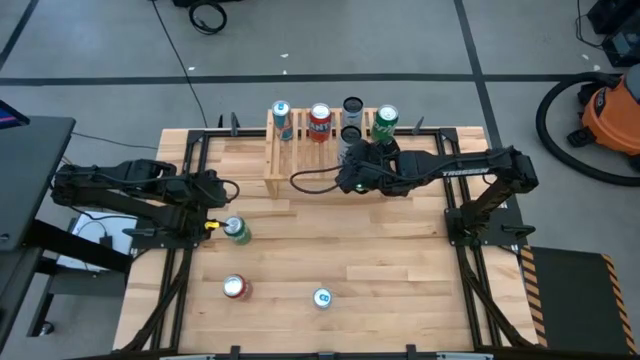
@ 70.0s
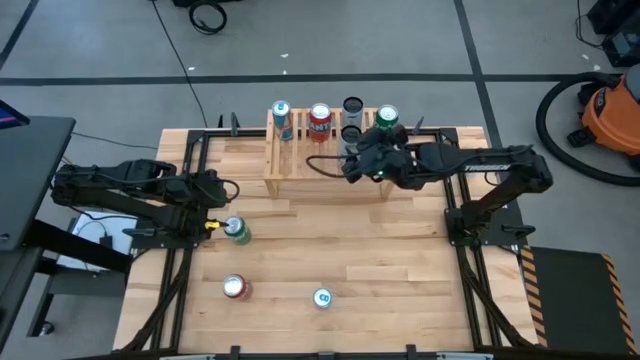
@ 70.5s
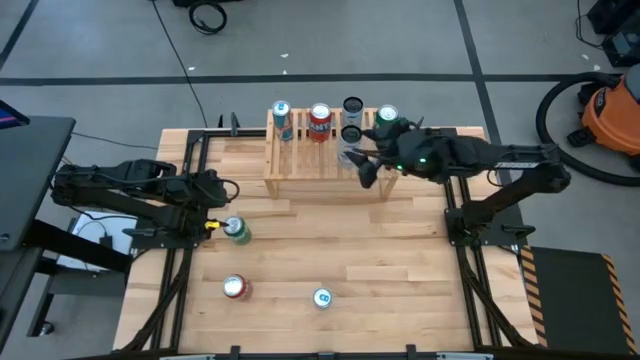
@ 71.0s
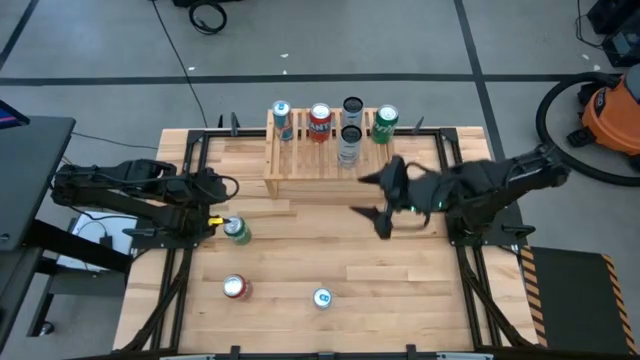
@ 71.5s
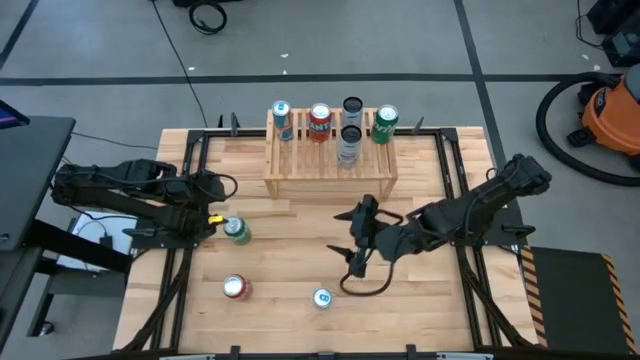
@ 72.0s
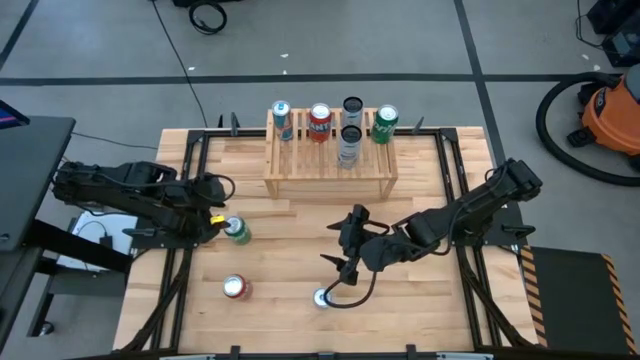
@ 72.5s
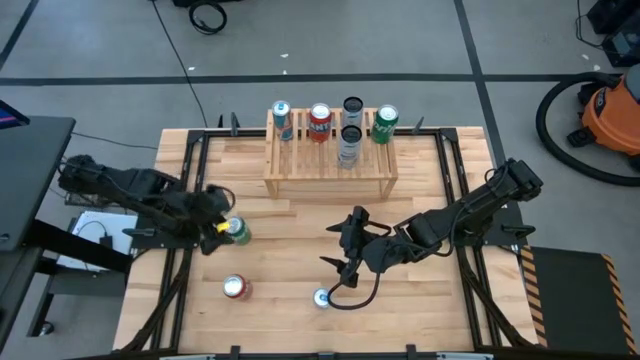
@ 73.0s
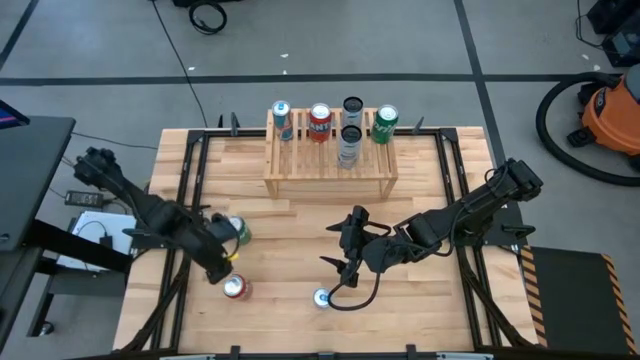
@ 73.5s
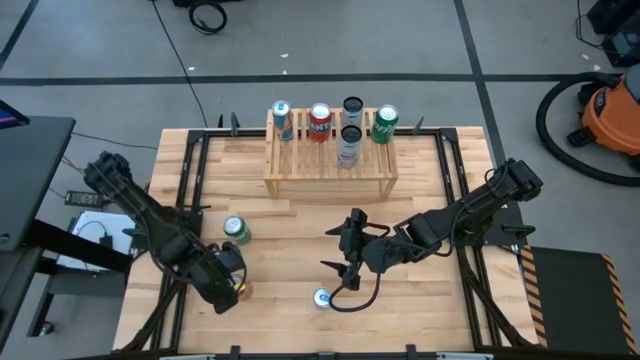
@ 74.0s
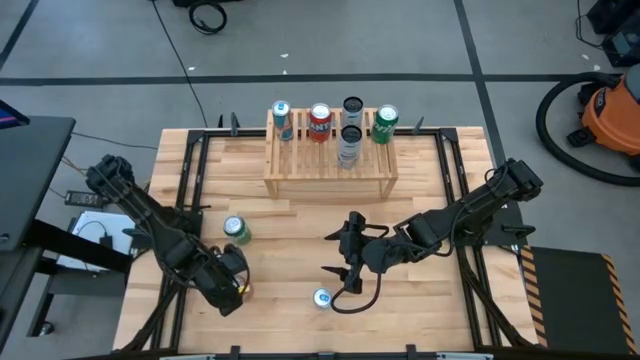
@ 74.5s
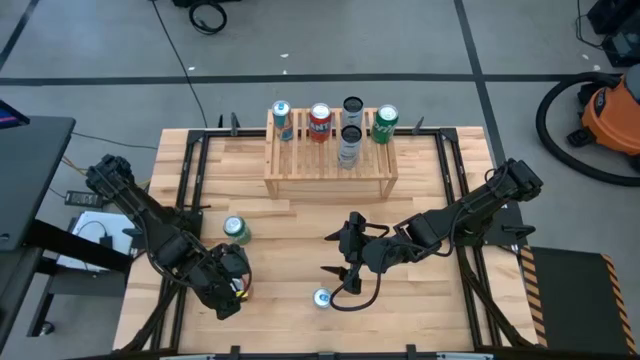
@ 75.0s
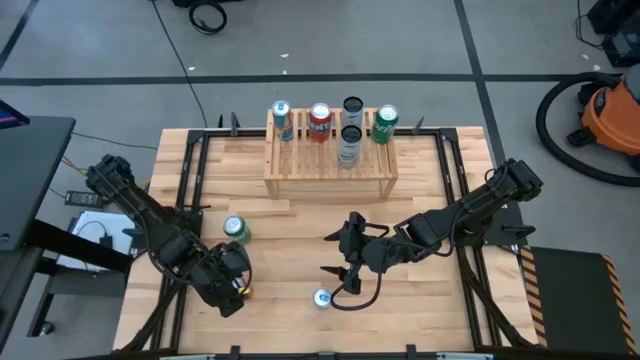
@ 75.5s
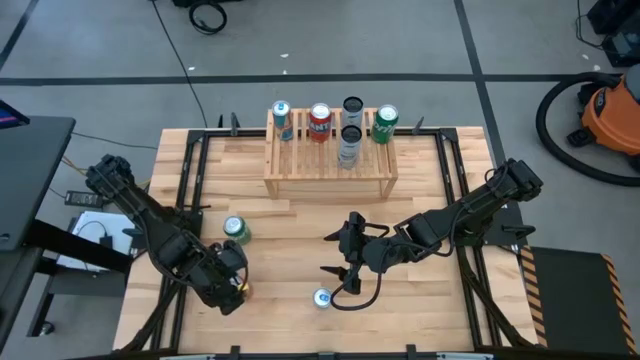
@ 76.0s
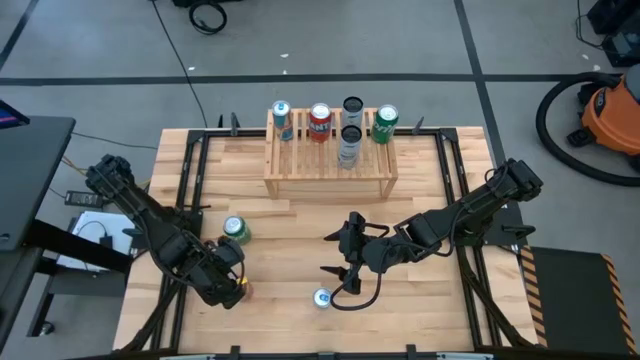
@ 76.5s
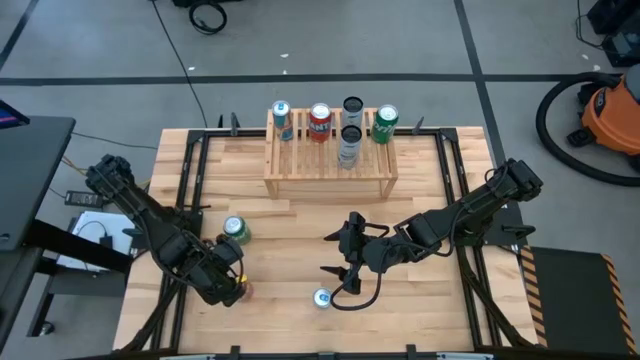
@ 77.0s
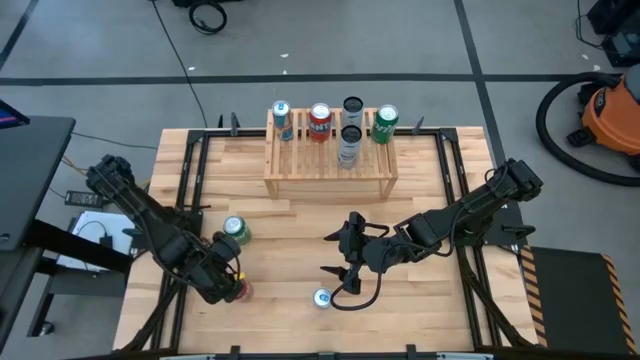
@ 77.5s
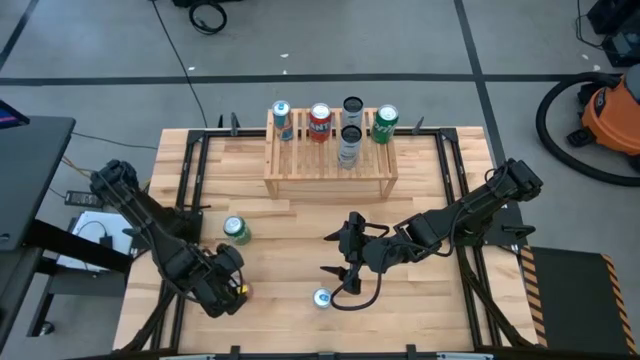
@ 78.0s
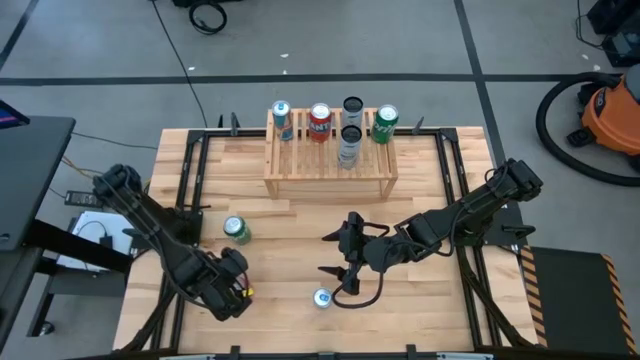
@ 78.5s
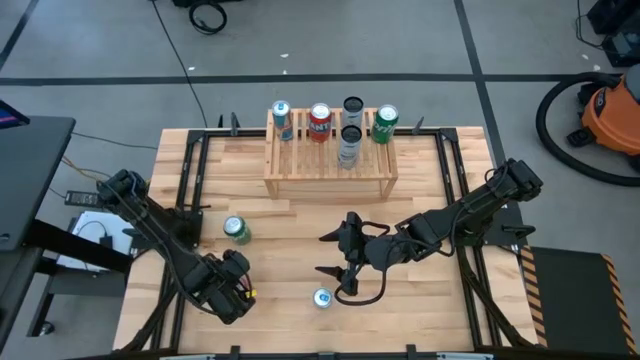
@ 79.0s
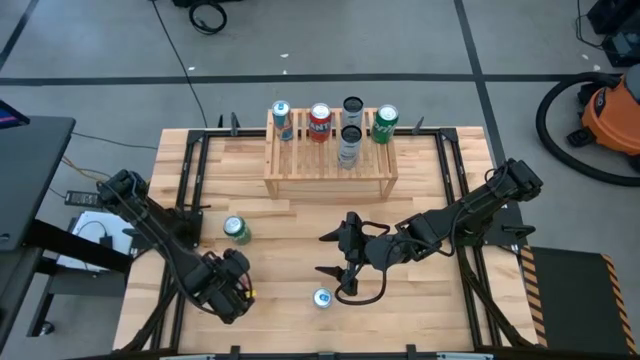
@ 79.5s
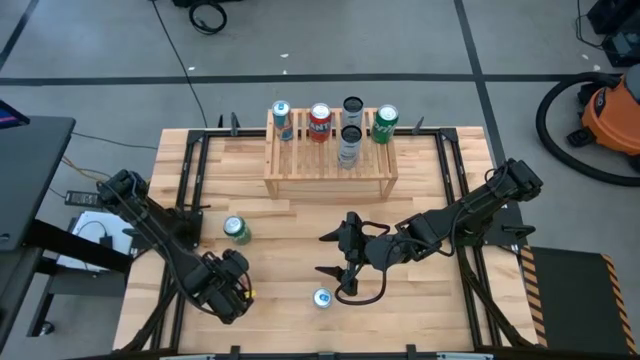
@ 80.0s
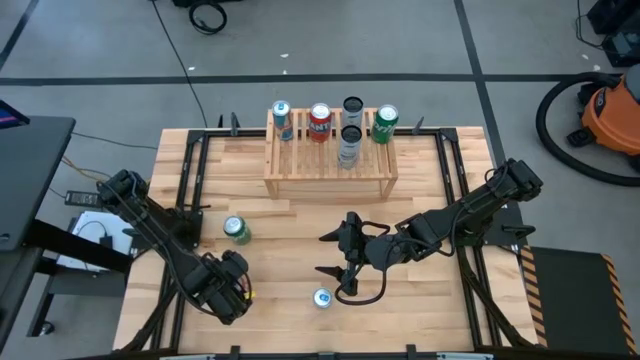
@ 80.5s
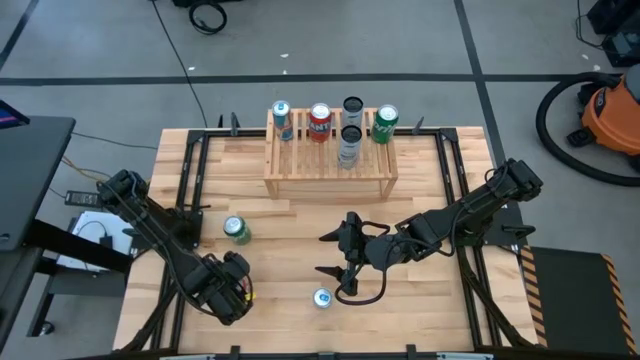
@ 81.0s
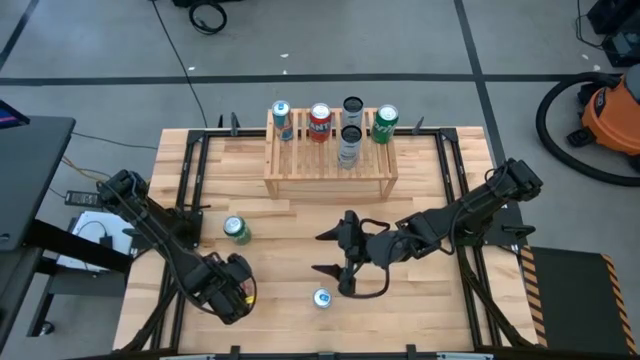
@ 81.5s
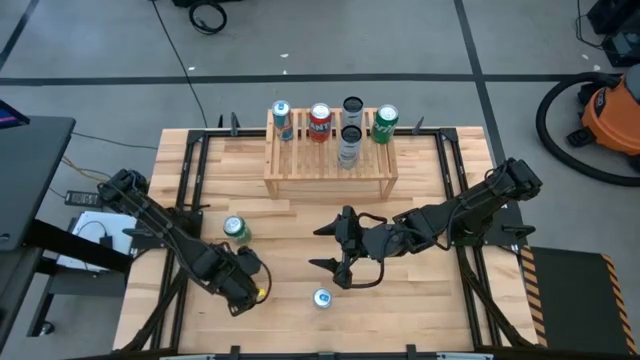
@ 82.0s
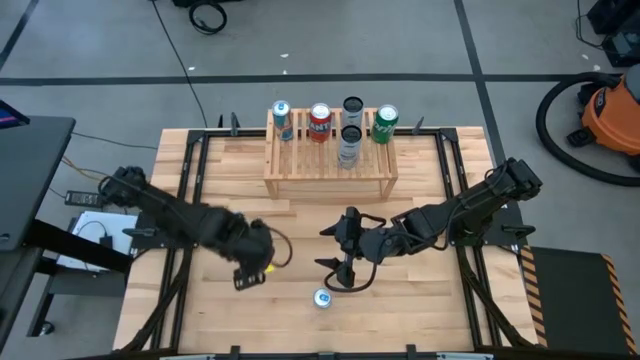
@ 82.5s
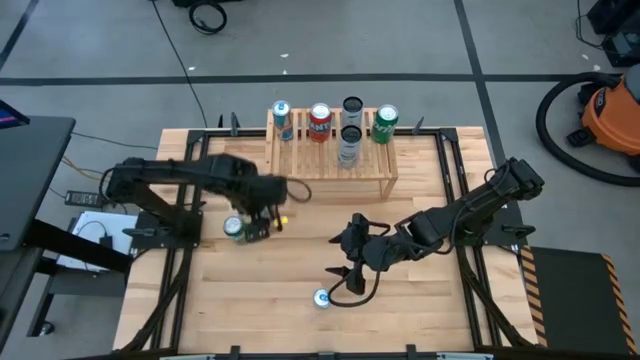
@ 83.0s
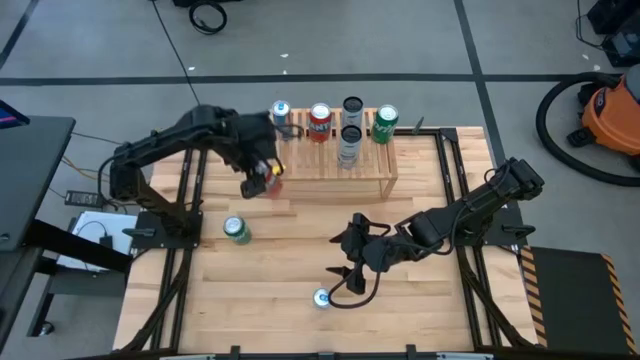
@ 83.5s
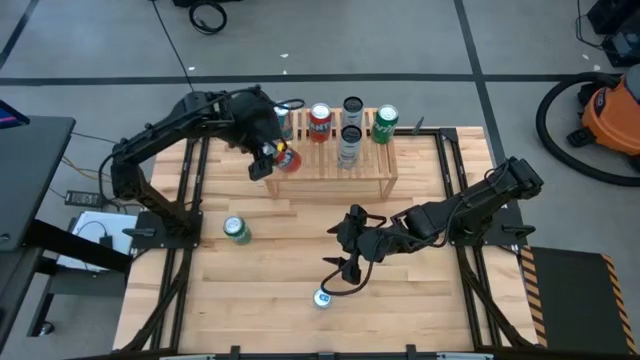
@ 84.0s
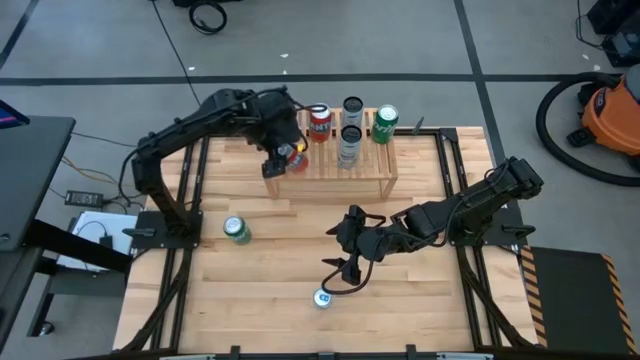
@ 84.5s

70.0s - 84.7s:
Task: Place canned beverage on shelf
Put the red soda can on the shelf aligned with the other red soda can

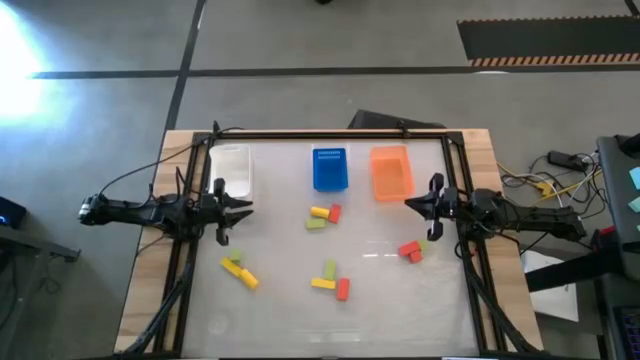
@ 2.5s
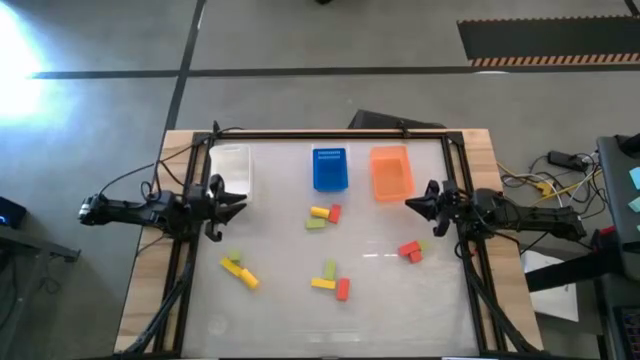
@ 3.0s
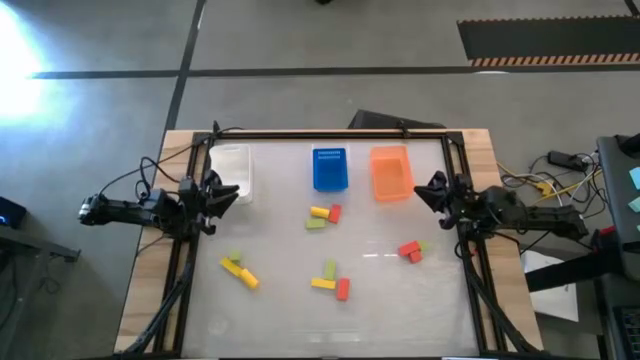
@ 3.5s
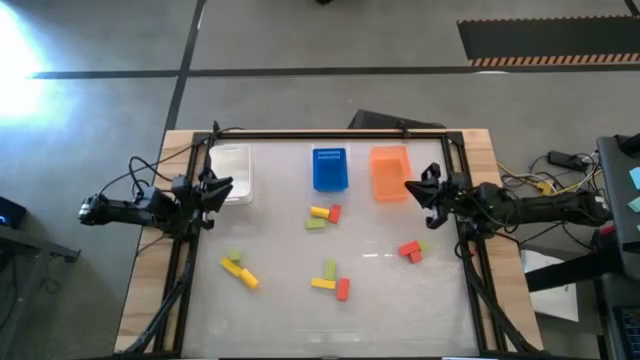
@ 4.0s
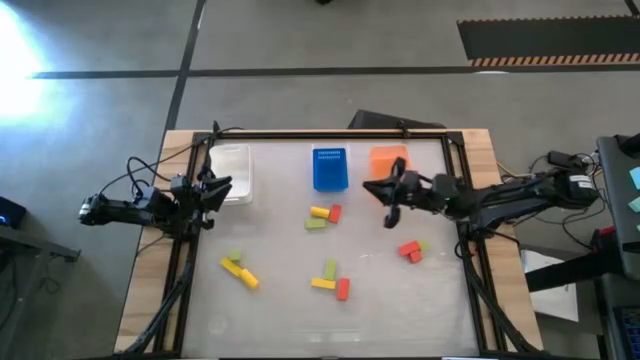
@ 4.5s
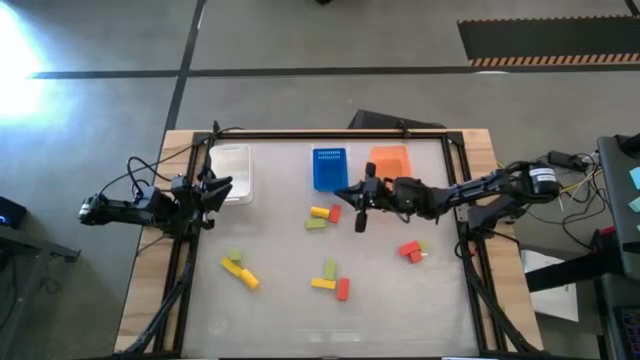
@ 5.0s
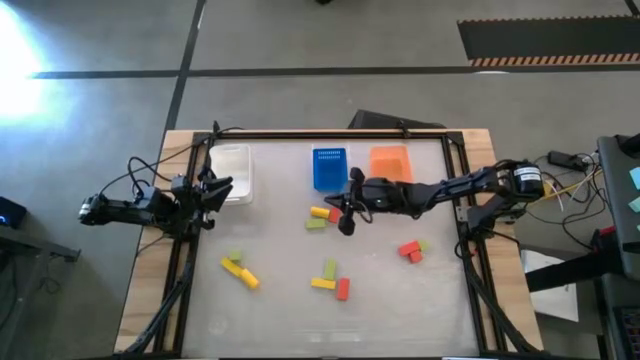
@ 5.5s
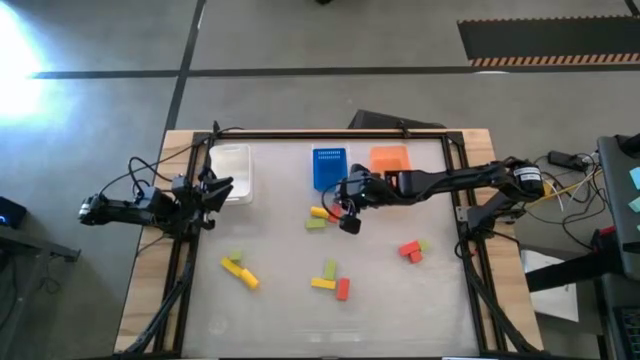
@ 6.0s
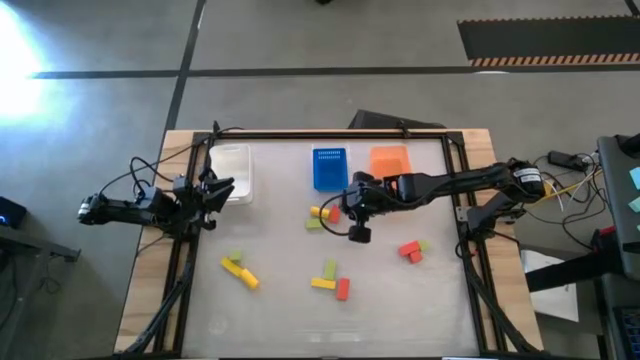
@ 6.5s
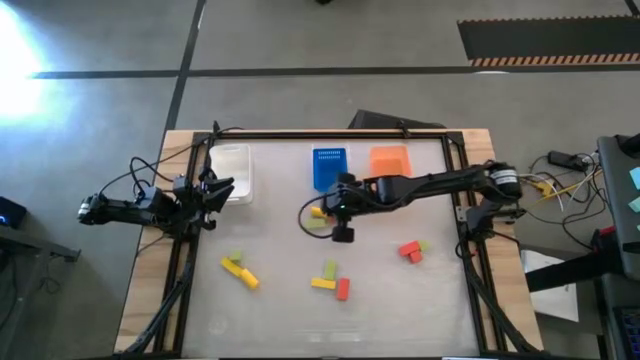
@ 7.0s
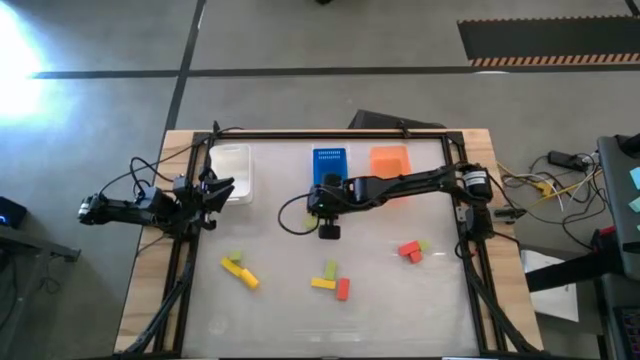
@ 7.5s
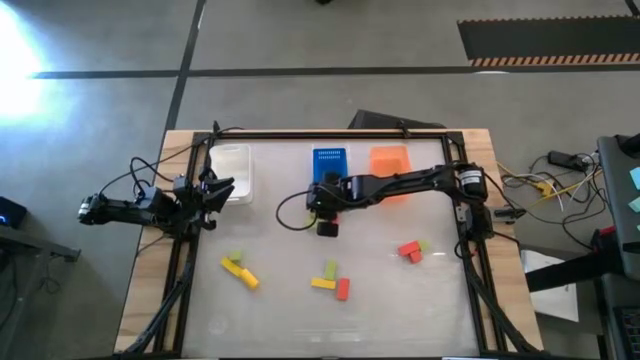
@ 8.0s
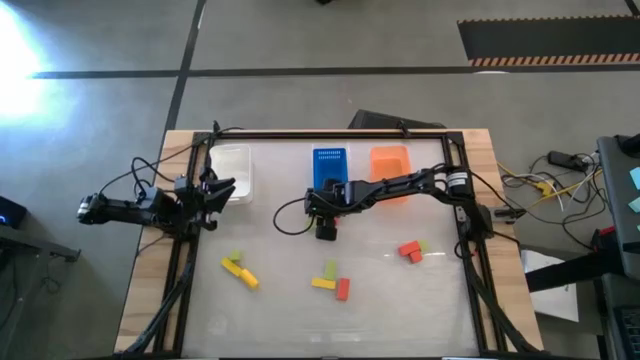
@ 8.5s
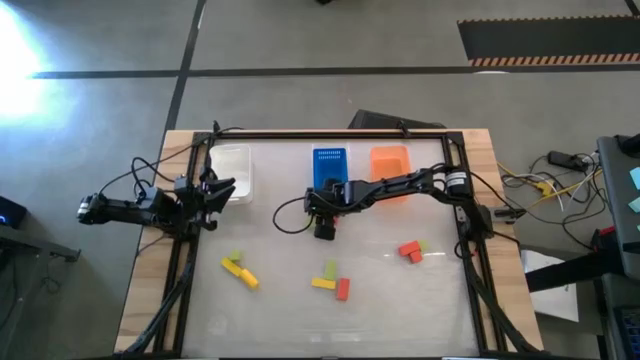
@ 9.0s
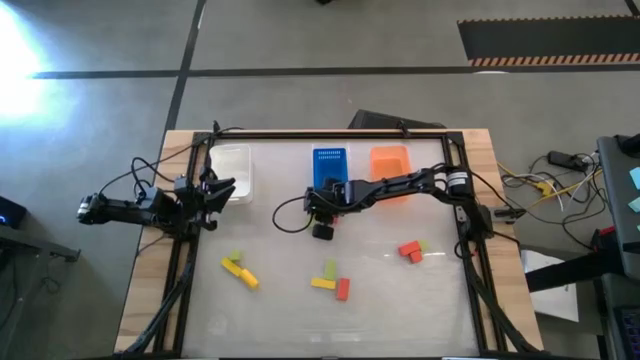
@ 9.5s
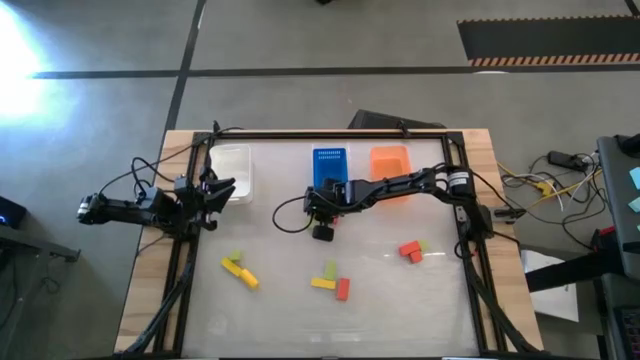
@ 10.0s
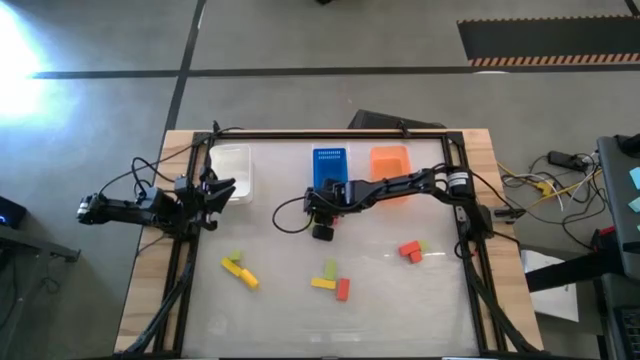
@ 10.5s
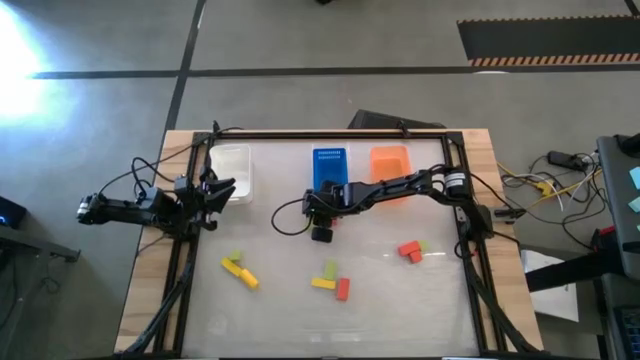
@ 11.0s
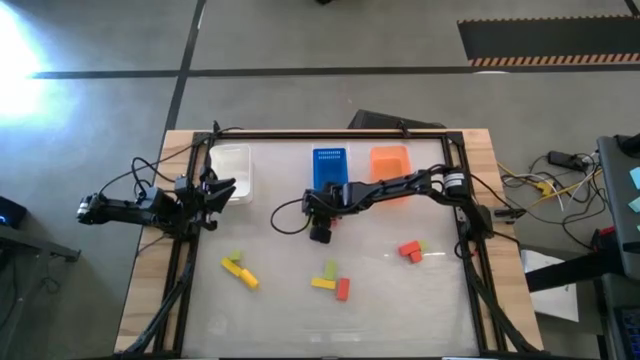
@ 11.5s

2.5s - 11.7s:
Task: Sort & place blocks by color
Put the yellow block into the blue bin
